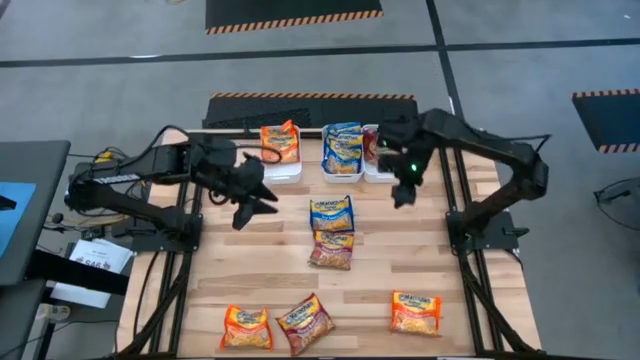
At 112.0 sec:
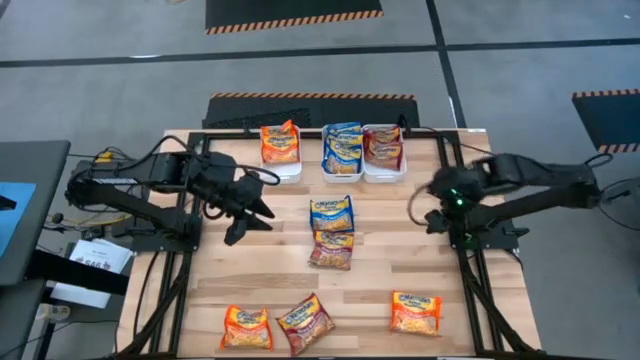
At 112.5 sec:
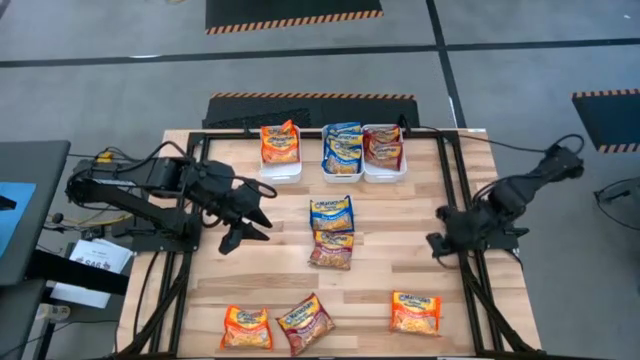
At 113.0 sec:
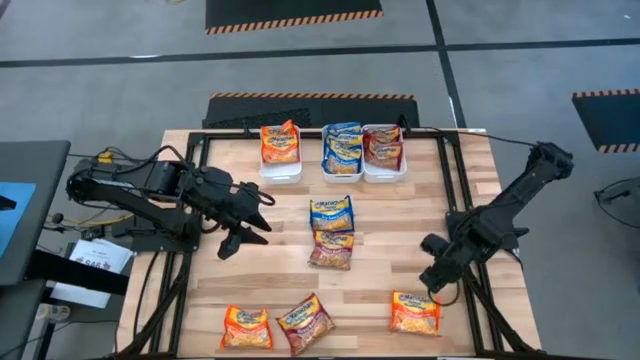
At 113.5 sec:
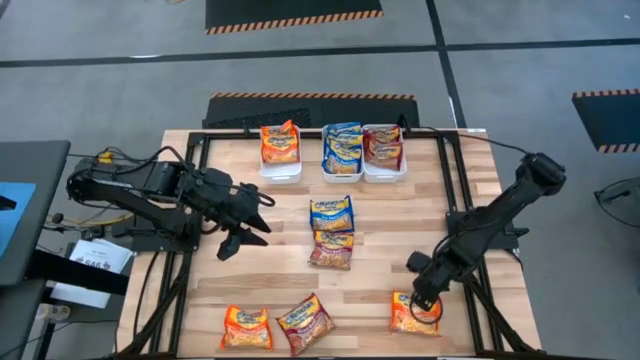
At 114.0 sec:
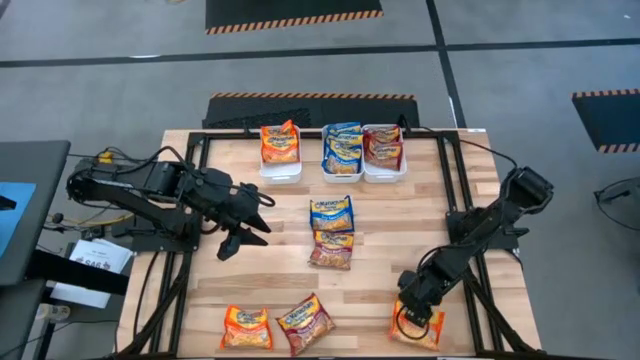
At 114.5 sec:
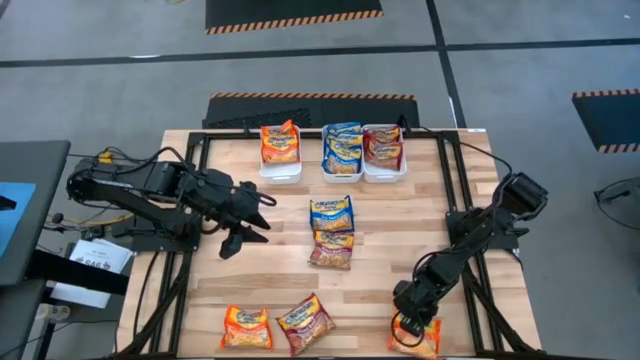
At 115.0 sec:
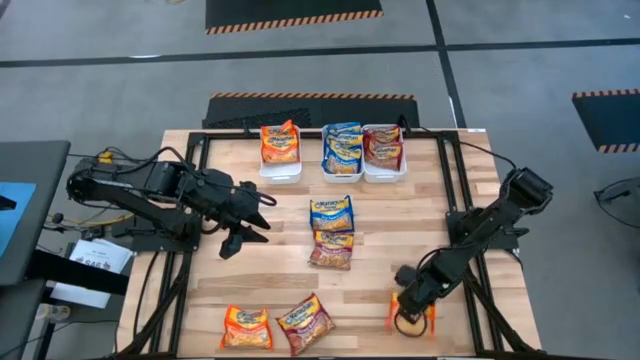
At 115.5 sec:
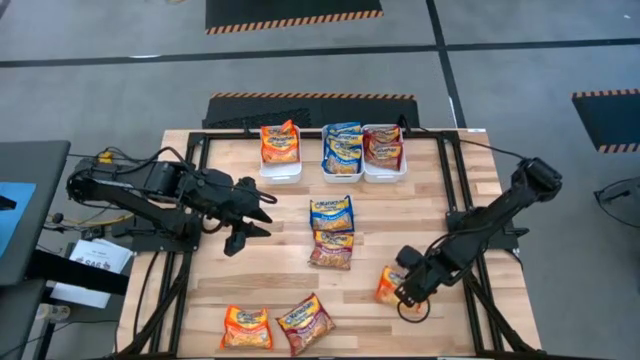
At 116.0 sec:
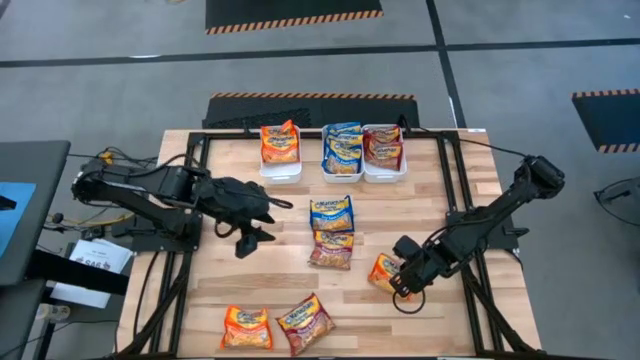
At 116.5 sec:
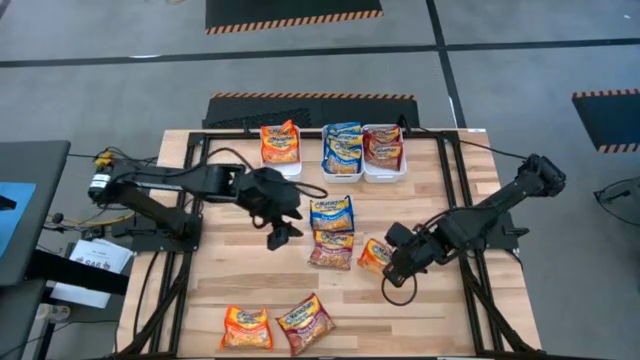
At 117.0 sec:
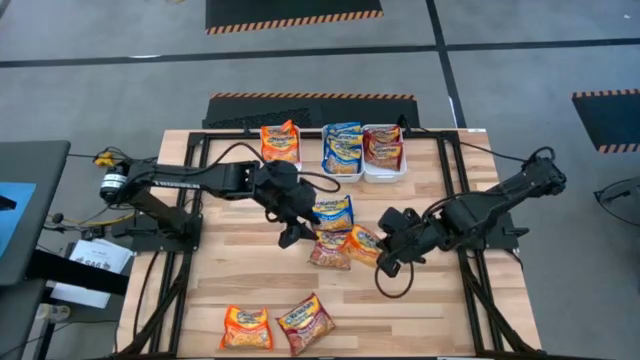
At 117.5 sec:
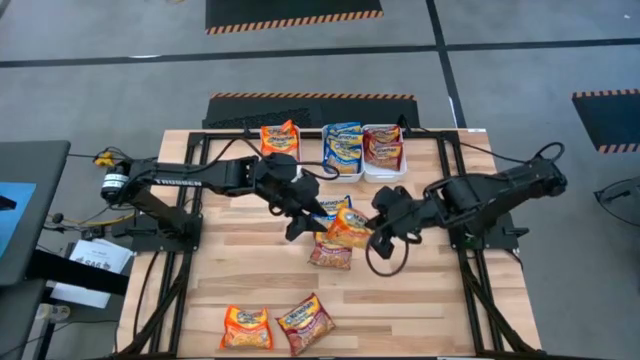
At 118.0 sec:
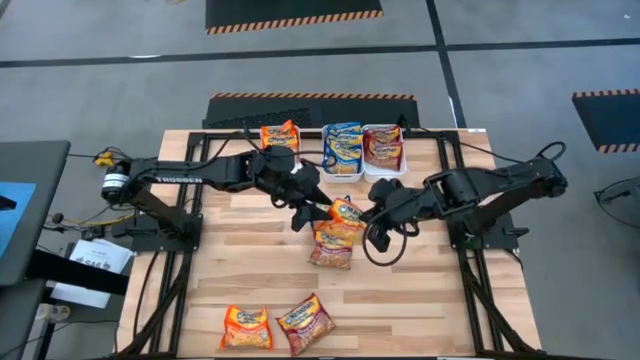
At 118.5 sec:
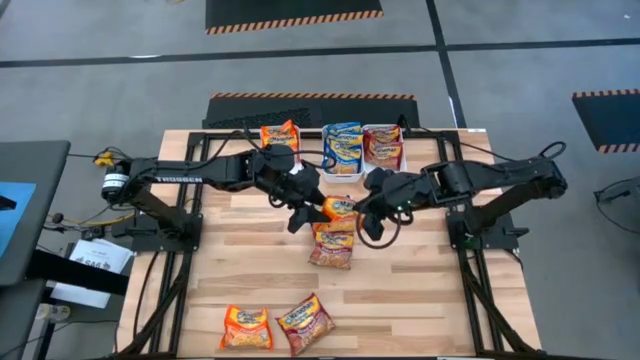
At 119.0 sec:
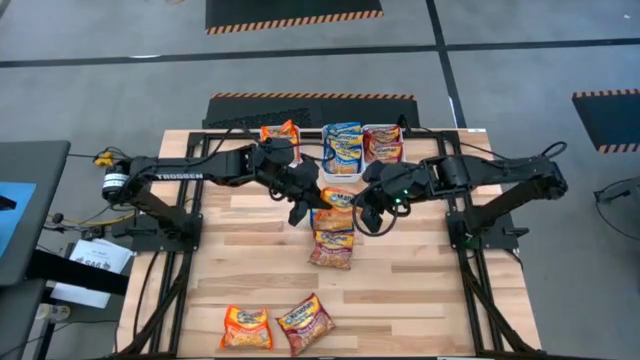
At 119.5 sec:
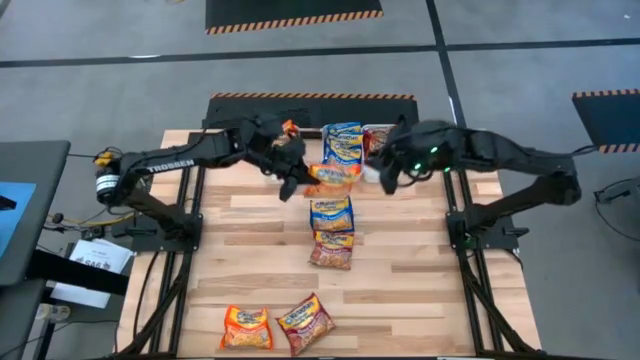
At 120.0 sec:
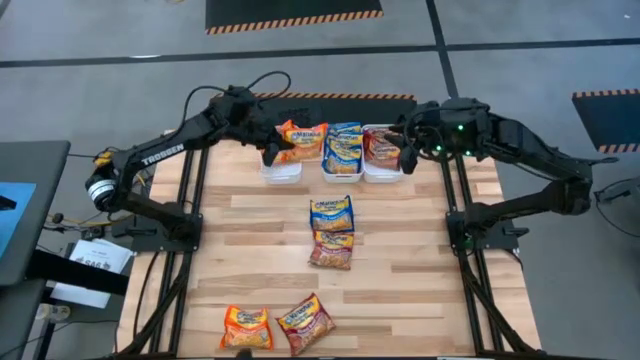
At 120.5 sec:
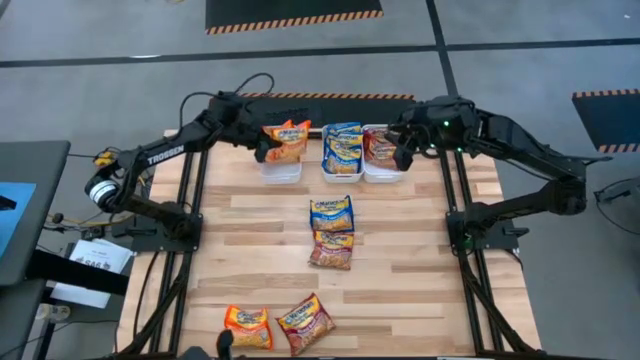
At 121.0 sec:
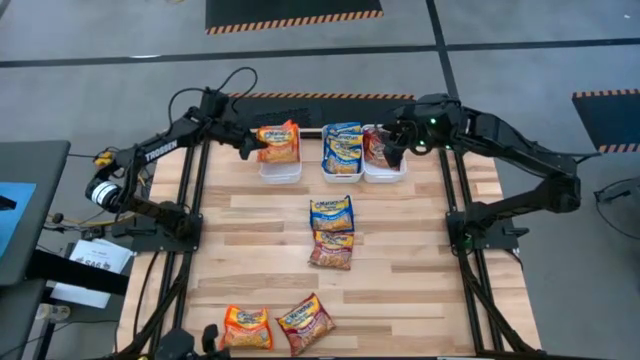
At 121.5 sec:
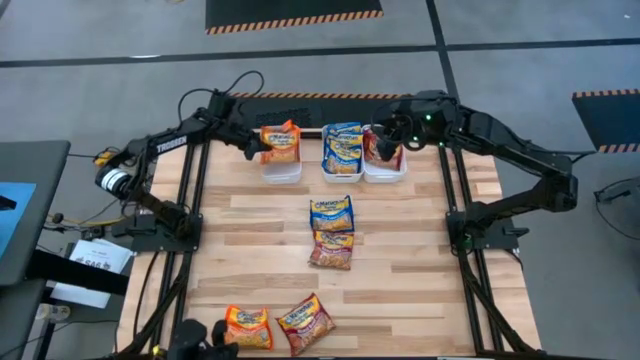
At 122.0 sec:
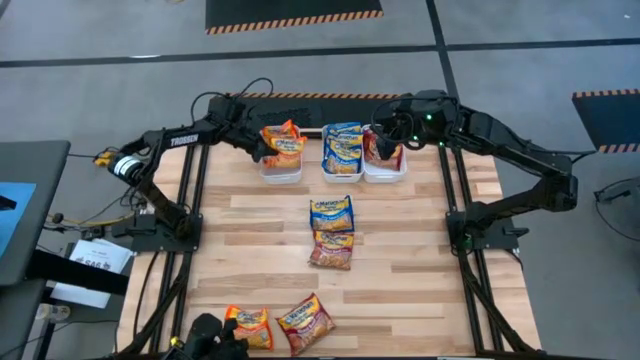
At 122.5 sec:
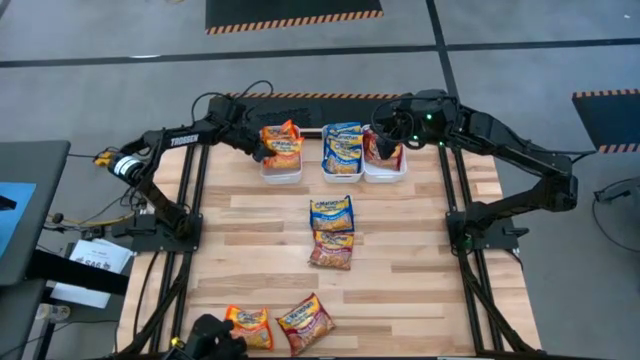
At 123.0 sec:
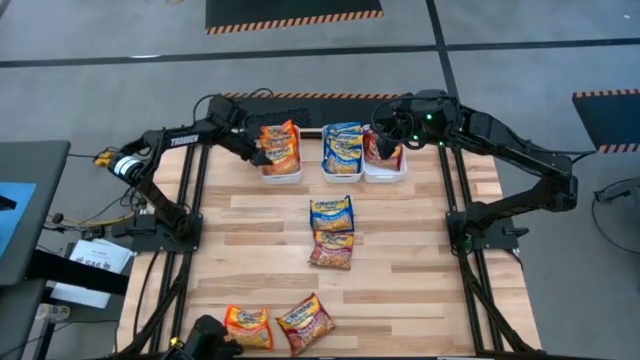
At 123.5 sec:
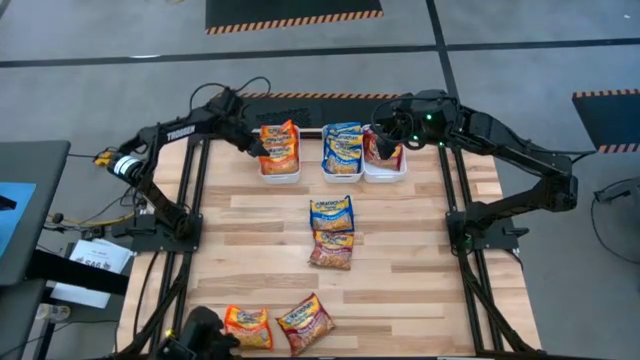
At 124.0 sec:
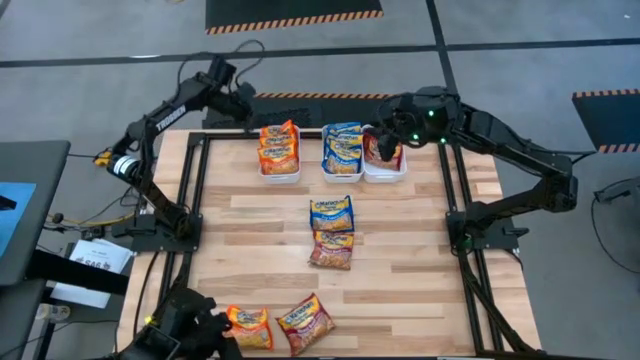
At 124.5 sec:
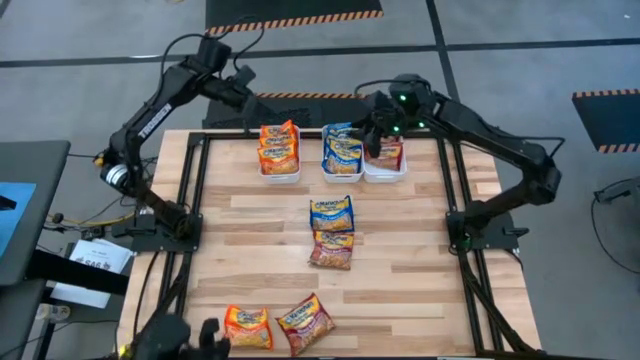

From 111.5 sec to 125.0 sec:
Task: Sort Maruchan noodles
Put the right orange noodle soup pack into the left white bin

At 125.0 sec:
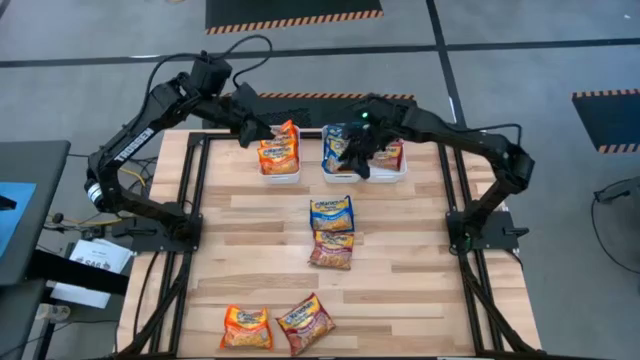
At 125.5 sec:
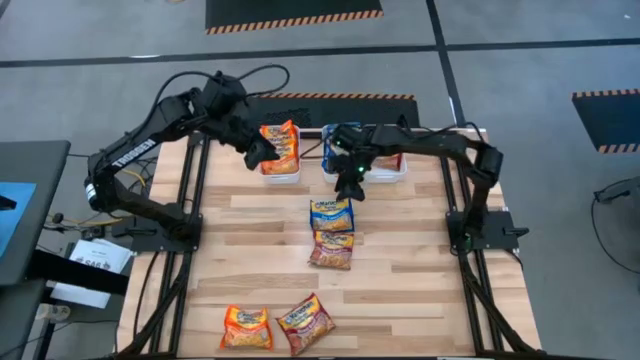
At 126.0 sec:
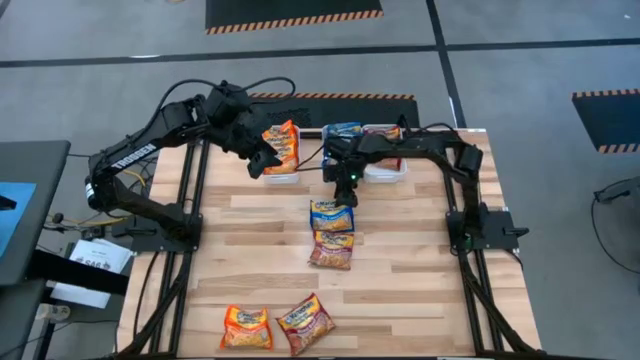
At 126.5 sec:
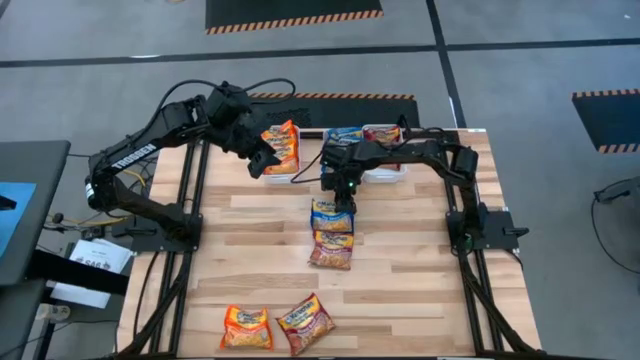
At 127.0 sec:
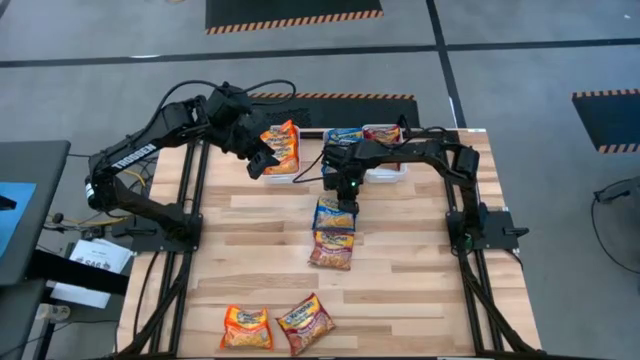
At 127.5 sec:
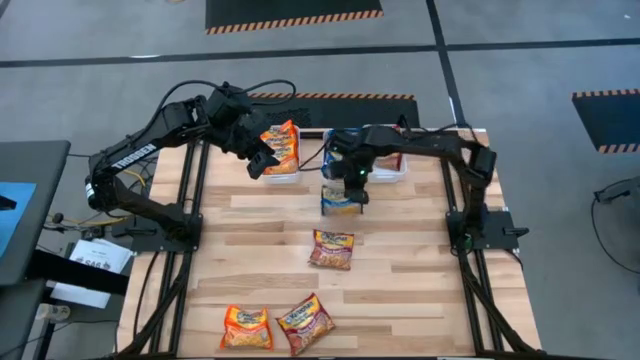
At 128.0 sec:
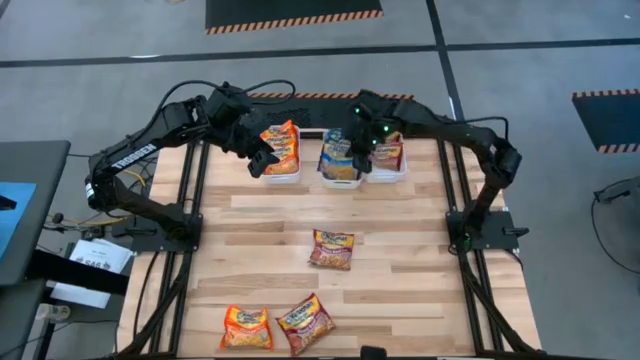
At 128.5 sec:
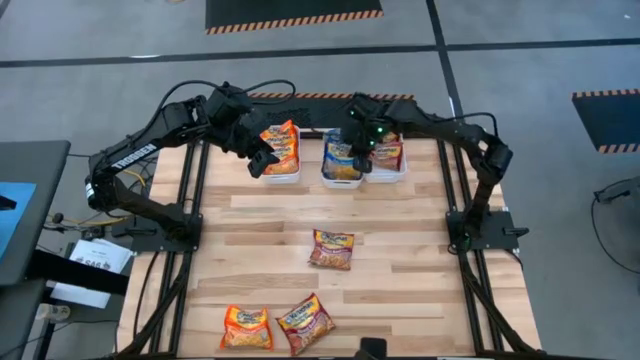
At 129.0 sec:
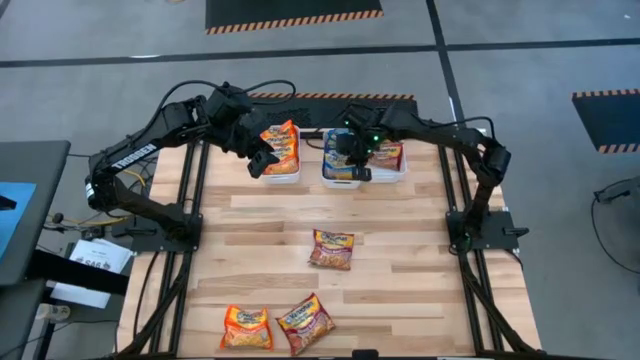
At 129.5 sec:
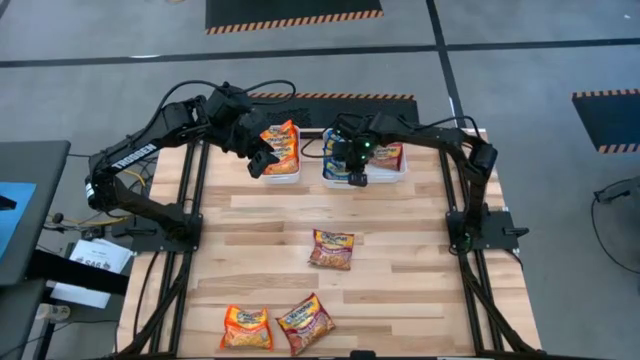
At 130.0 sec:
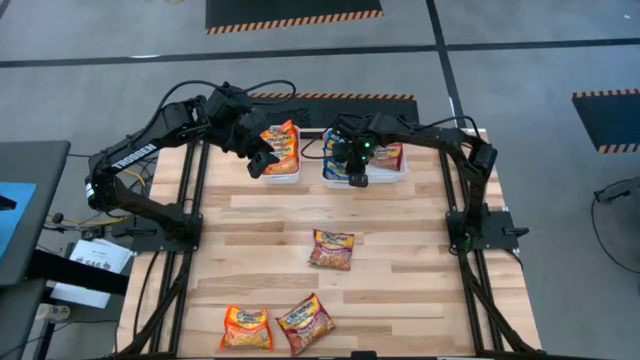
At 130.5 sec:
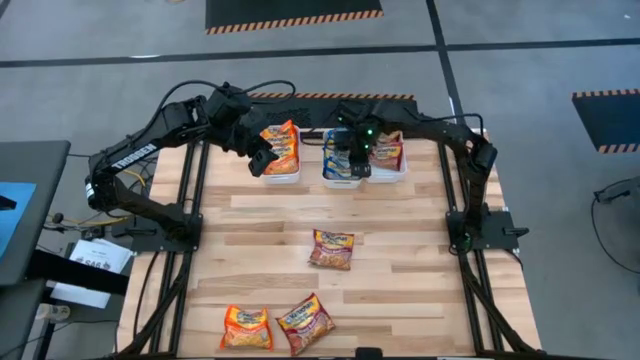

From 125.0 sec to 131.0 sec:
Put the blue noodle soup pack into the middle white bin
